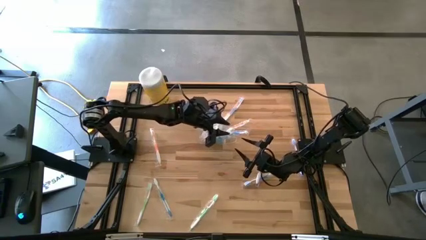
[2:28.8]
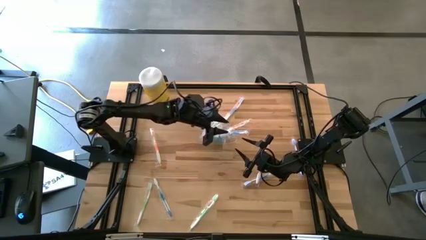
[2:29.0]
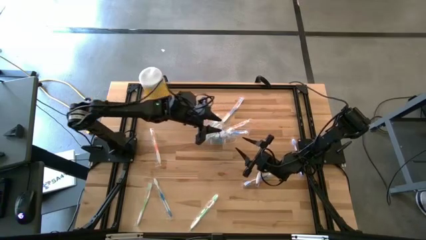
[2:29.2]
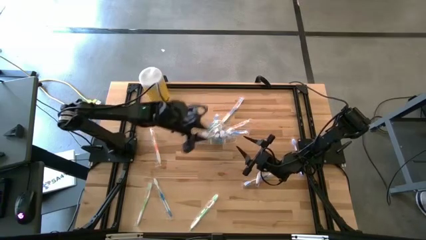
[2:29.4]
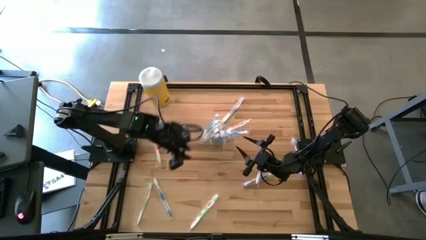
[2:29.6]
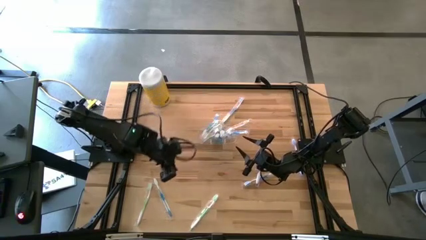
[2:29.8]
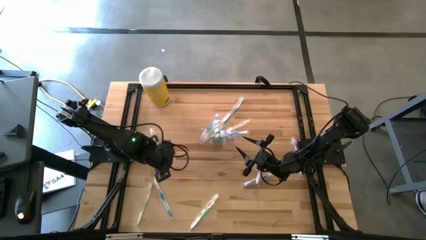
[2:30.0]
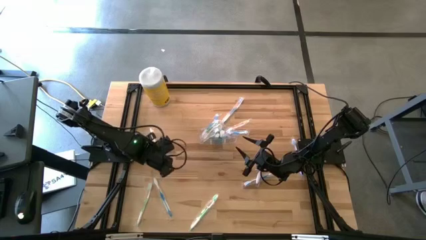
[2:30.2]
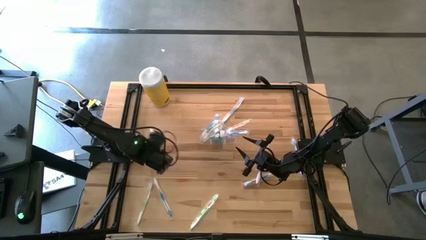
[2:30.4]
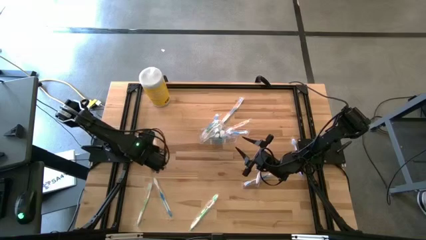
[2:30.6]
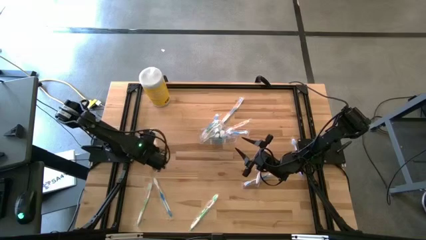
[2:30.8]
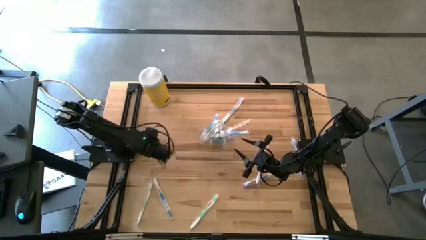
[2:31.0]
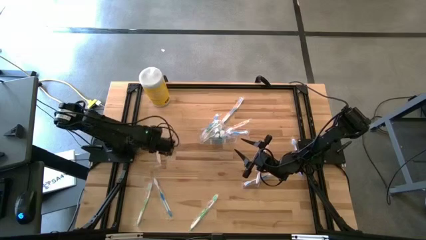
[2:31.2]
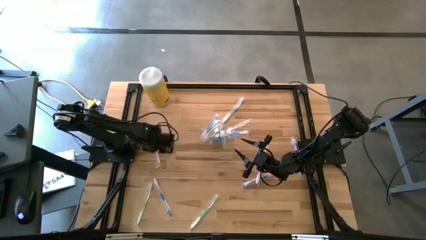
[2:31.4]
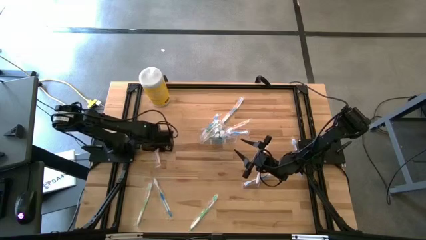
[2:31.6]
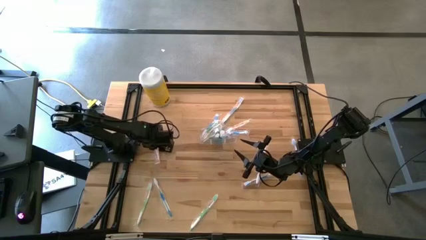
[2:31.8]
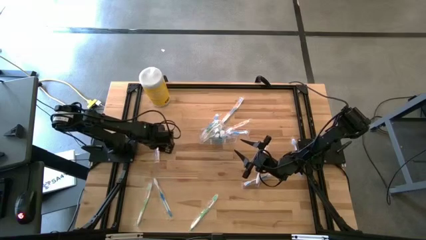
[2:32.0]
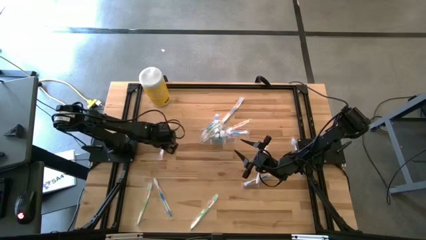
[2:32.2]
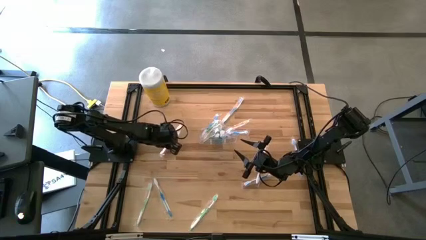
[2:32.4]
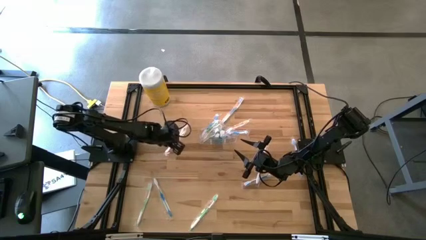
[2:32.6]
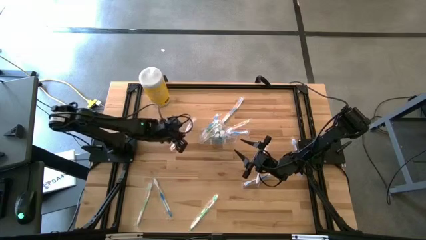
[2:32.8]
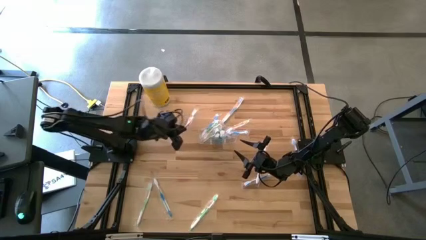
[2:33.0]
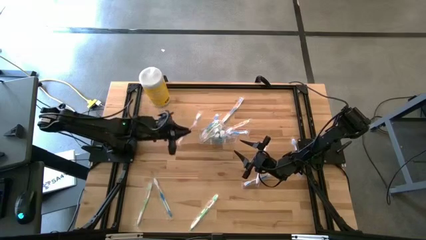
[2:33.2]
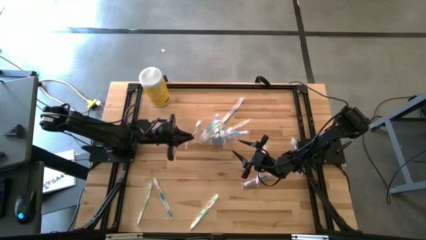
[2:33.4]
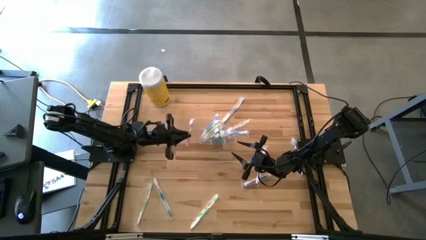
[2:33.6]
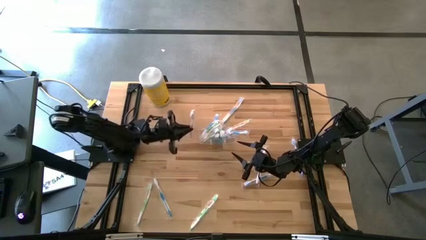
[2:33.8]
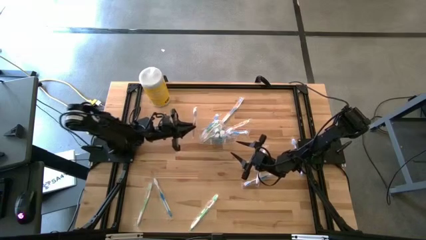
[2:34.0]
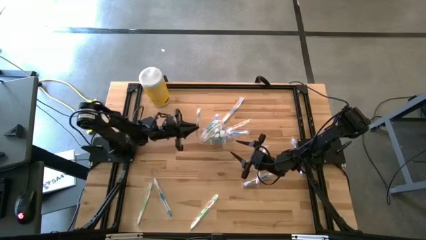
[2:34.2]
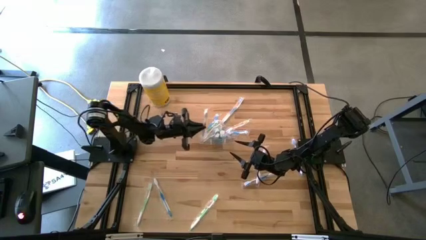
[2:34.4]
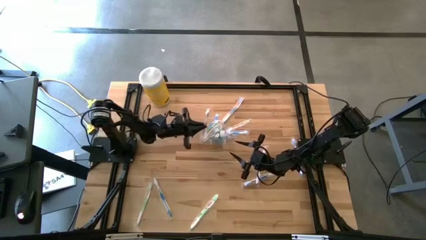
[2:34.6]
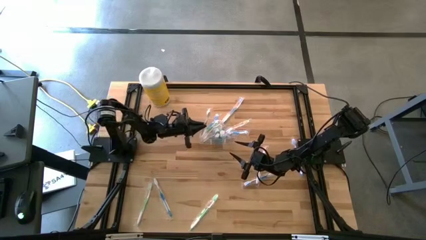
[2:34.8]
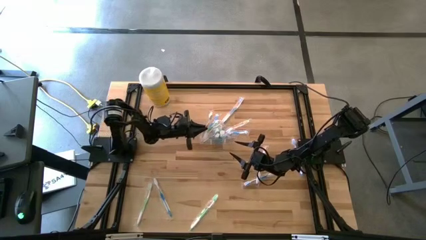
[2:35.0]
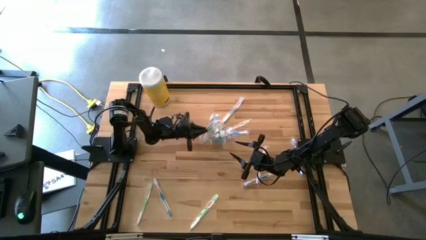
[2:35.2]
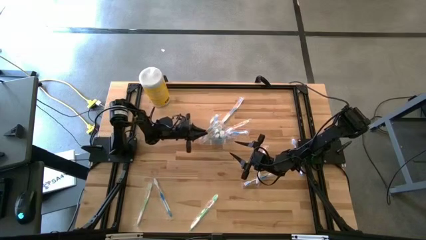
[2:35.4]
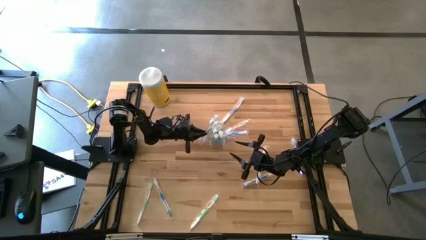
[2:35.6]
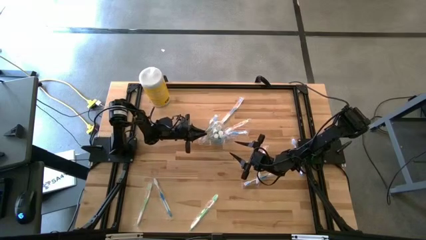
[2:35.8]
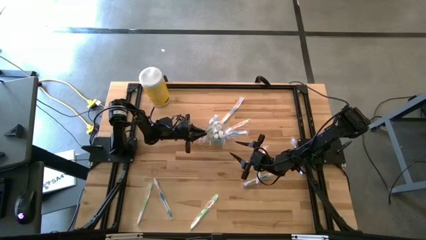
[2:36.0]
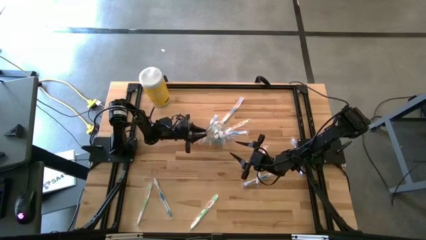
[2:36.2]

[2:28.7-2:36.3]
Task: Pick & Place toothbrushing station
Put the orange toothbrush into the transparent organizer

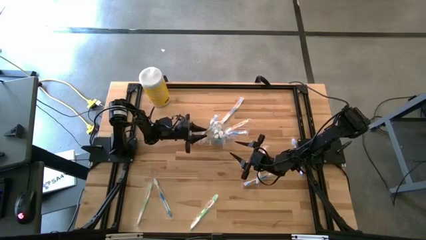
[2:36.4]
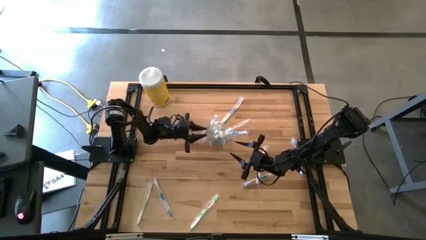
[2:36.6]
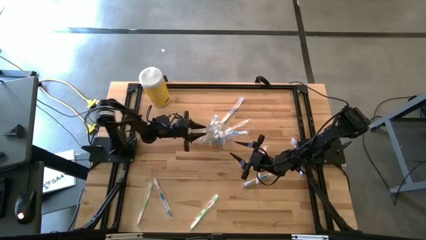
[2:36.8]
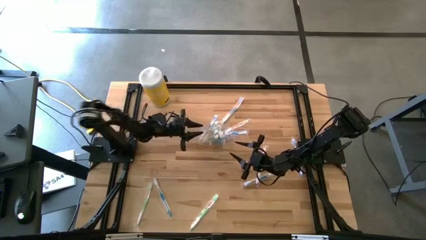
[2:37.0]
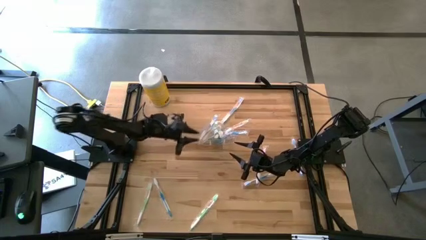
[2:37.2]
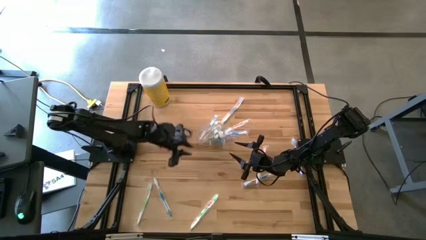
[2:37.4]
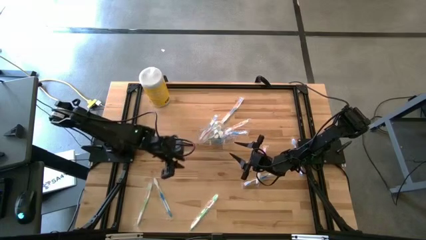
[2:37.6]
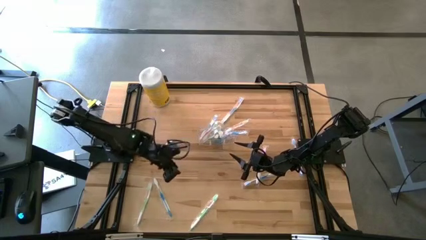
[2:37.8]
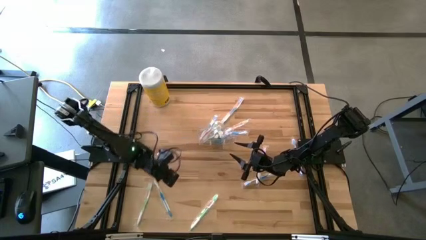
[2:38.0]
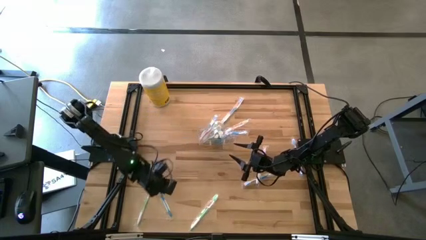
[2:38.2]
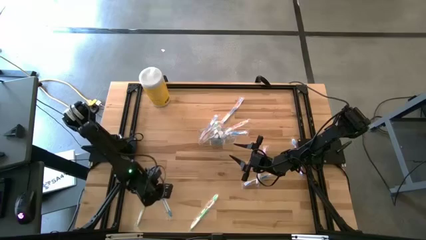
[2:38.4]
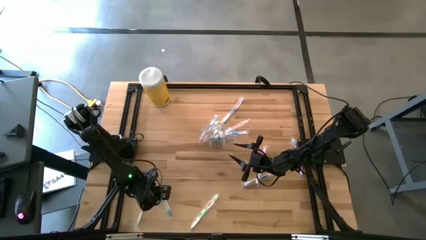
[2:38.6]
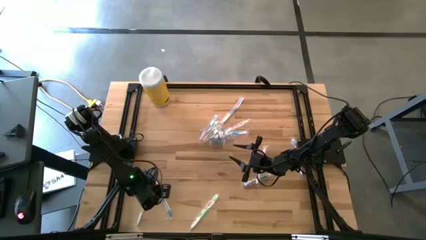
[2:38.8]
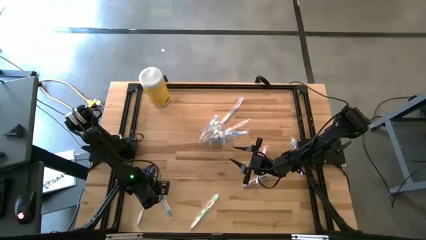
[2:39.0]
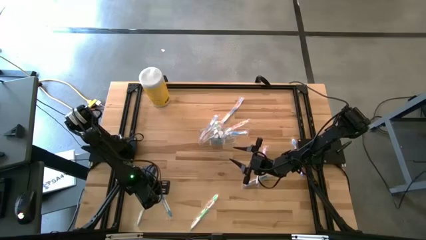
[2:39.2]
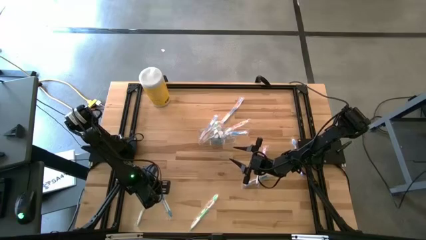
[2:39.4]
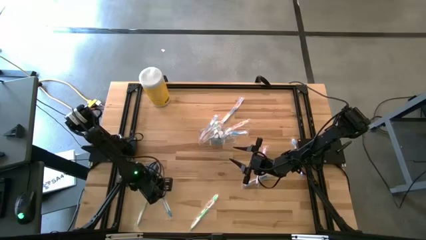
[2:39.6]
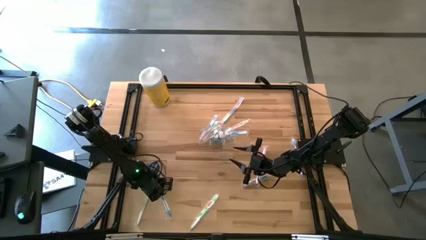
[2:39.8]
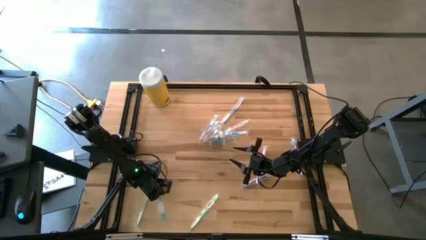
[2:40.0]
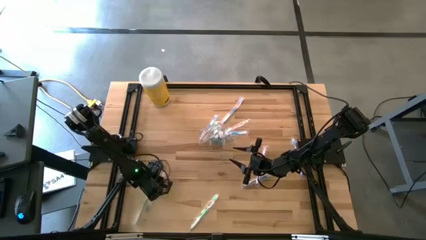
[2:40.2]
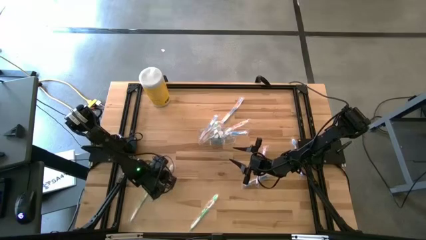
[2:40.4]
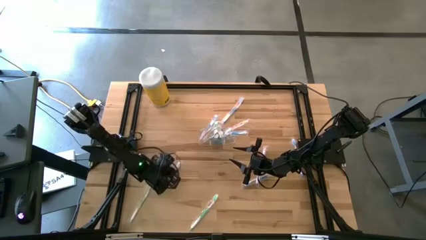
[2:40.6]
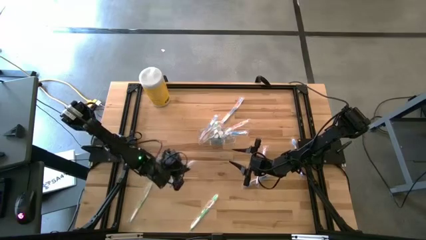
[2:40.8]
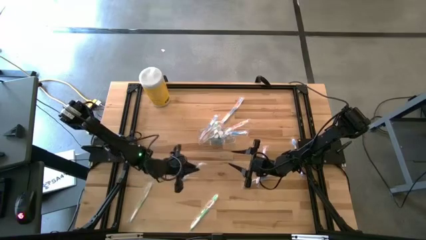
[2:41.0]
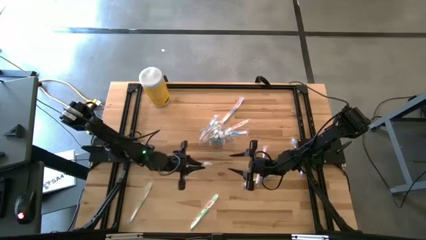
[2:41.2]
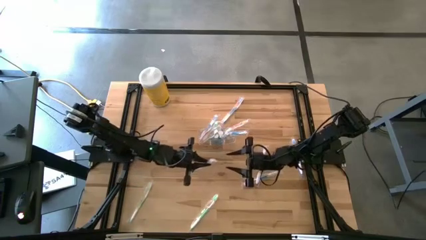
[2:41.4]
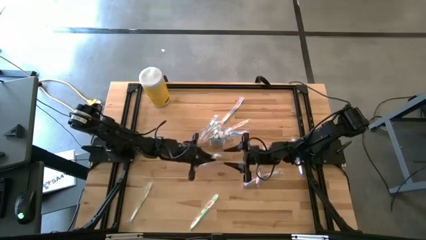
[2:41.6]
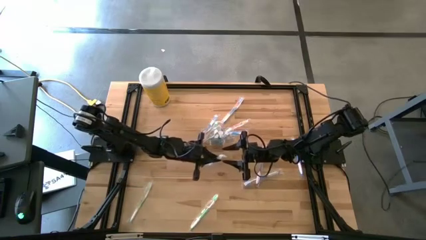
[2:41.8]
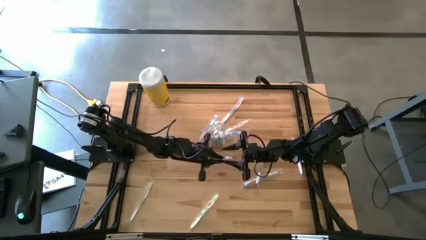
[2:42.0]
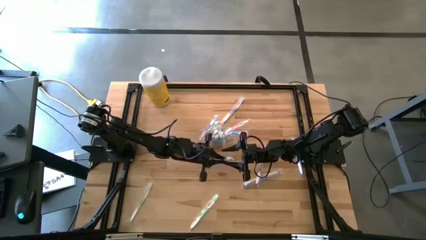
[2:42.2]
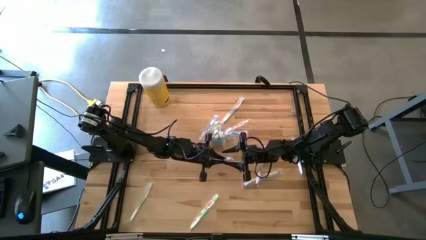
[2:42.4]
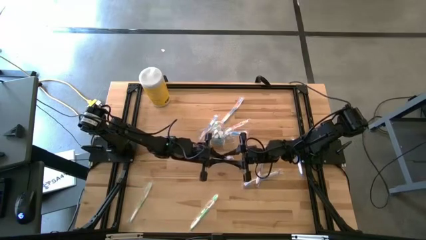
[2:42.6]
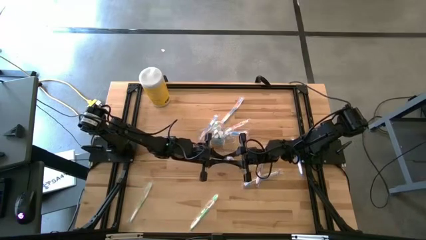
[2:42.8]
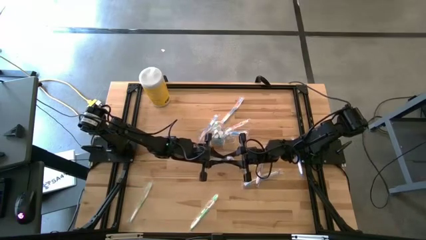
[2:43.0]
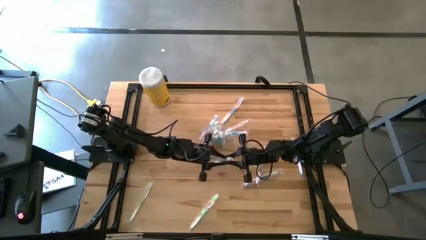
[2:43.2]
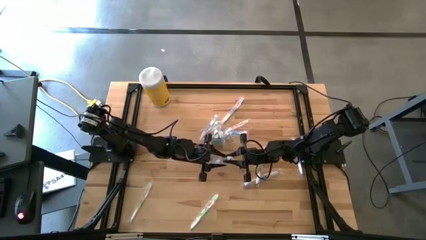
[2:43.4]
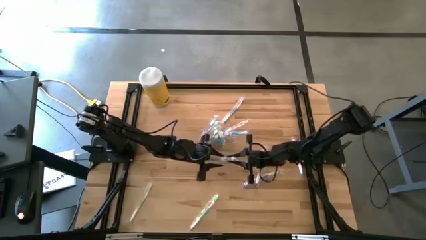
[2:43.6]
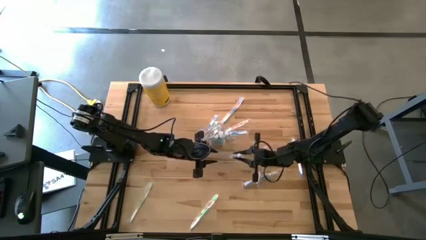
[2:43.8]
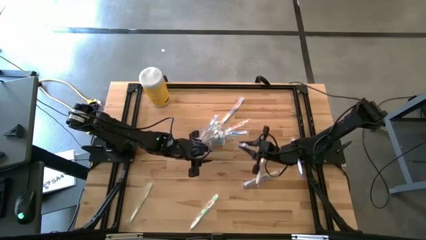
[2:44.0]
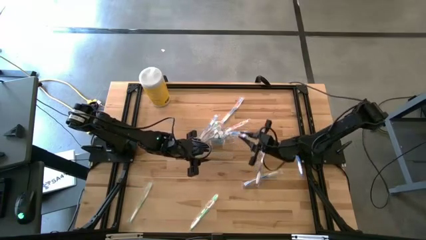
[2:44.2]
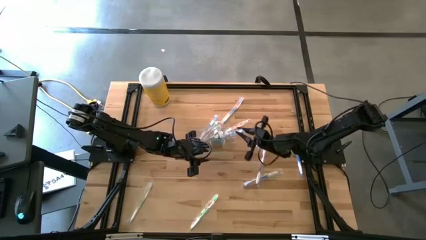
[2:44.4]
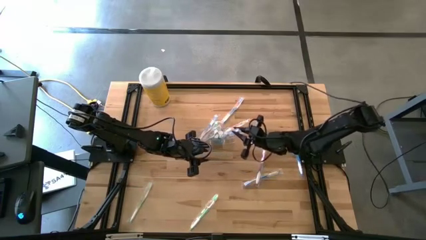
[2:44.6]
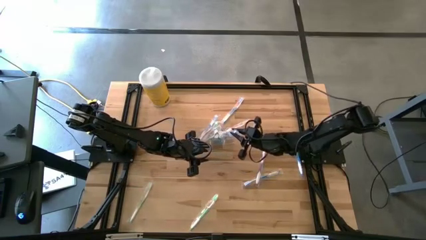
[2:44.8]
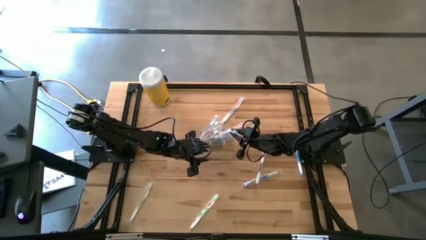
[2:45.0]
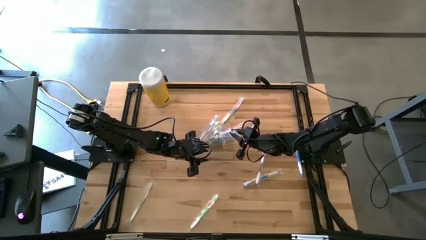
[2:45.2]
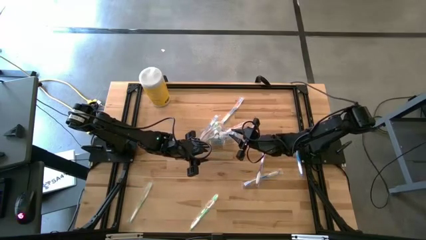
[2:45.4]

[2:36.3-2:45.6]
Put the blue toothbrush into the transparent organizer
